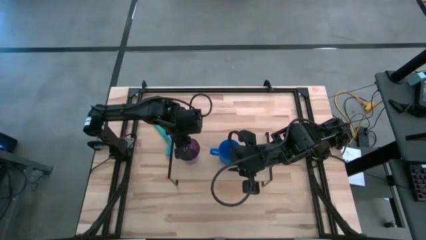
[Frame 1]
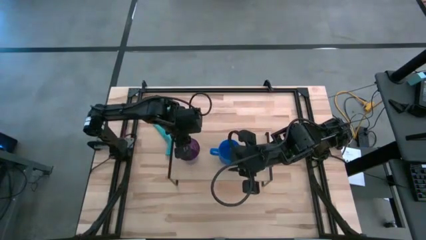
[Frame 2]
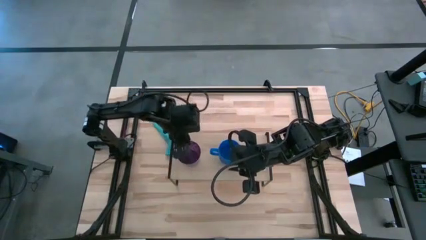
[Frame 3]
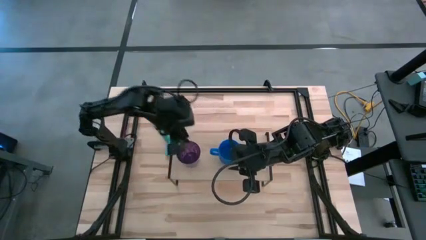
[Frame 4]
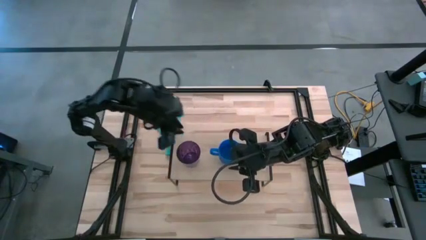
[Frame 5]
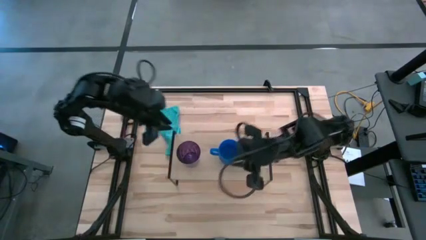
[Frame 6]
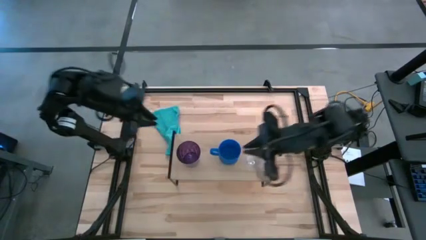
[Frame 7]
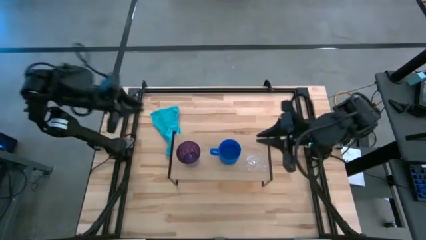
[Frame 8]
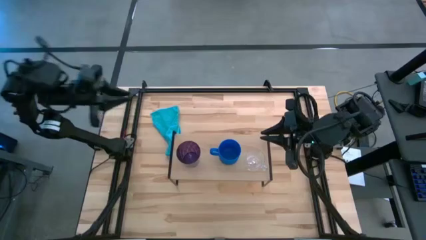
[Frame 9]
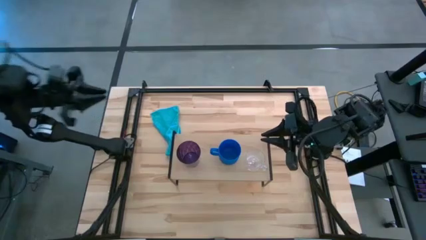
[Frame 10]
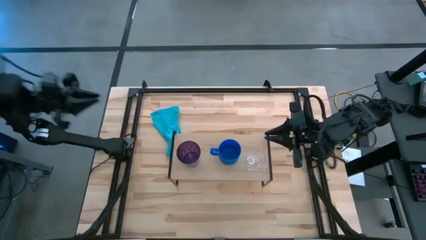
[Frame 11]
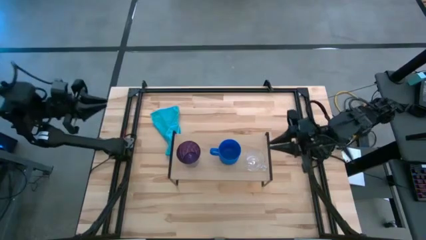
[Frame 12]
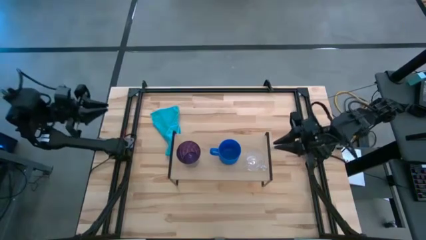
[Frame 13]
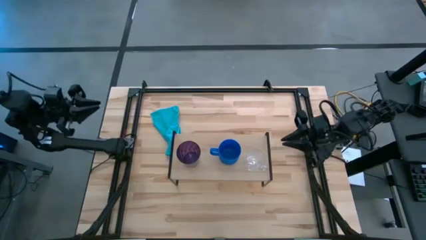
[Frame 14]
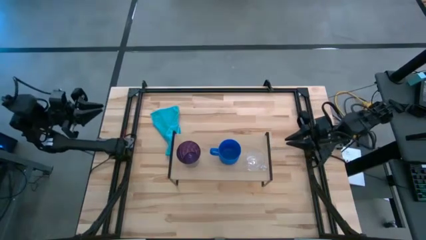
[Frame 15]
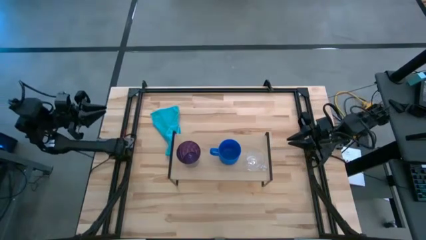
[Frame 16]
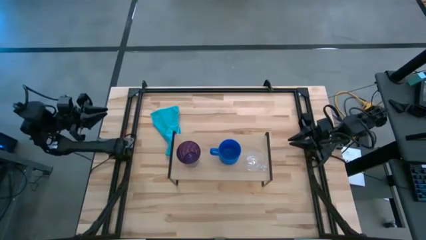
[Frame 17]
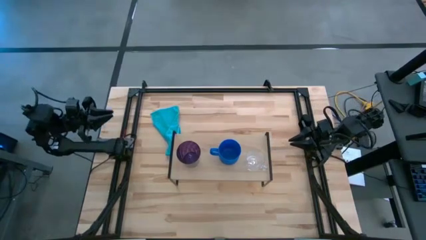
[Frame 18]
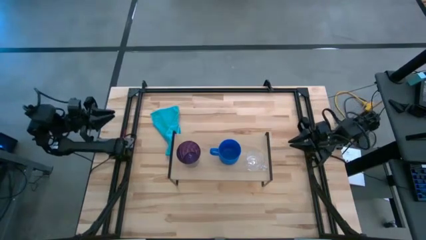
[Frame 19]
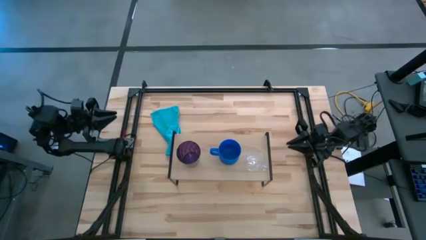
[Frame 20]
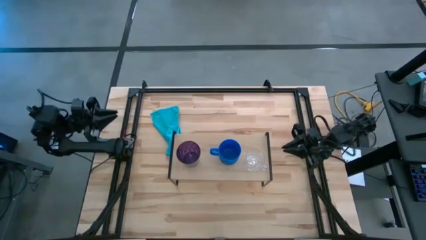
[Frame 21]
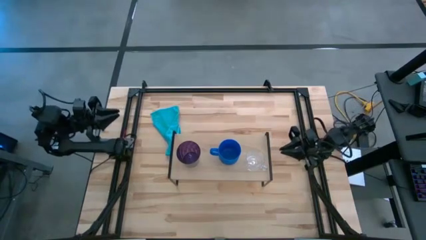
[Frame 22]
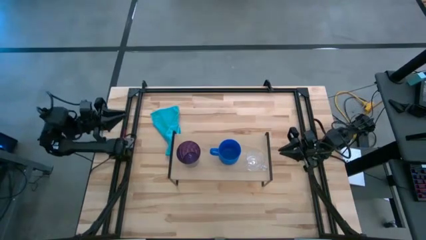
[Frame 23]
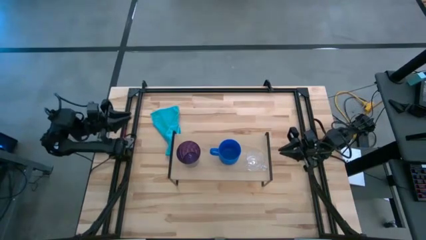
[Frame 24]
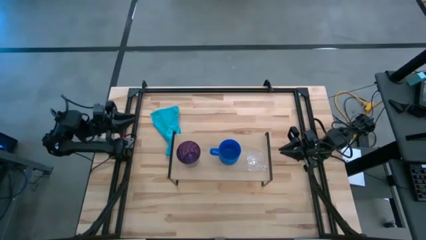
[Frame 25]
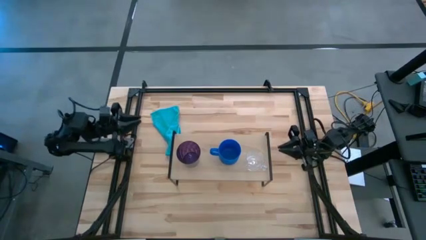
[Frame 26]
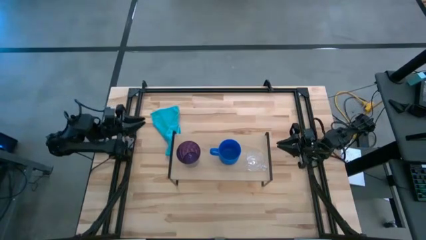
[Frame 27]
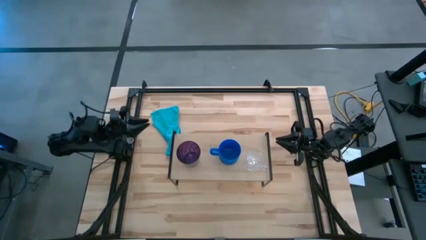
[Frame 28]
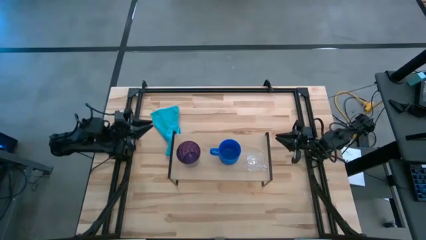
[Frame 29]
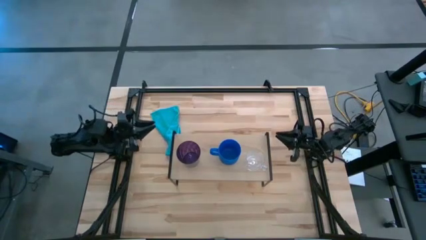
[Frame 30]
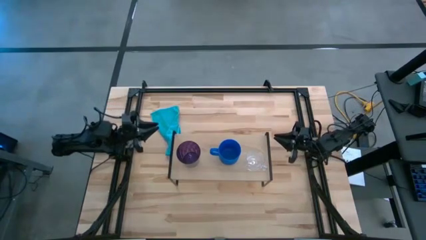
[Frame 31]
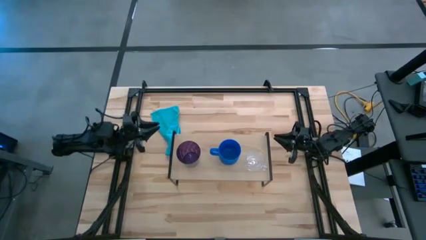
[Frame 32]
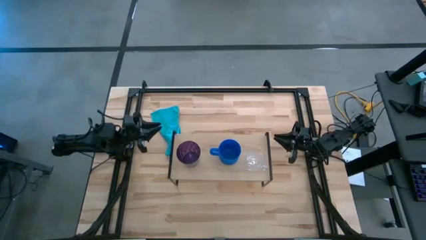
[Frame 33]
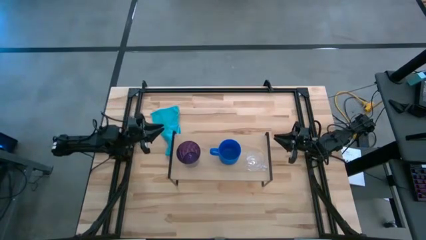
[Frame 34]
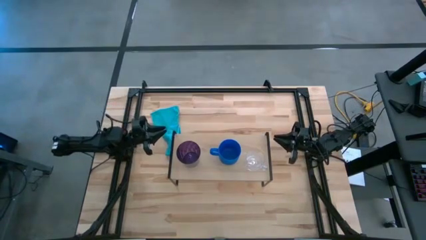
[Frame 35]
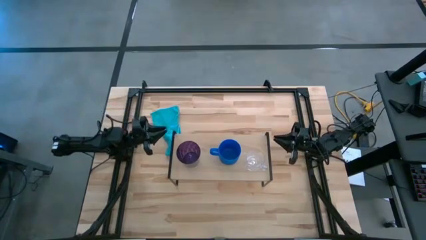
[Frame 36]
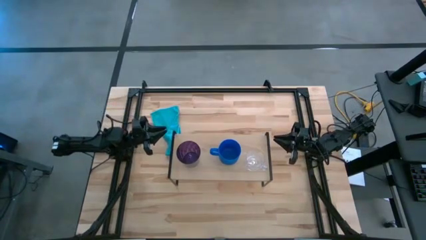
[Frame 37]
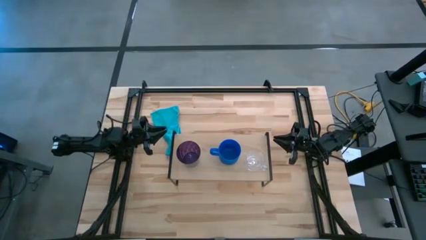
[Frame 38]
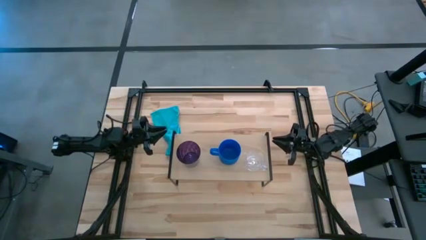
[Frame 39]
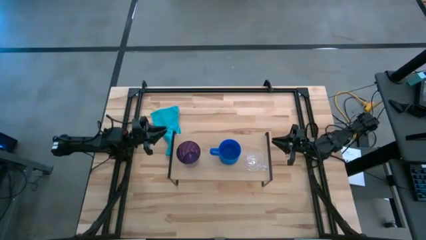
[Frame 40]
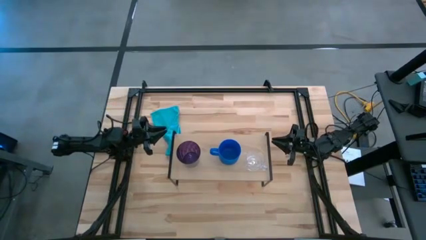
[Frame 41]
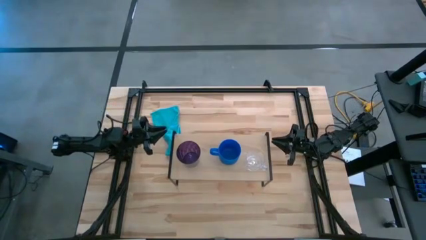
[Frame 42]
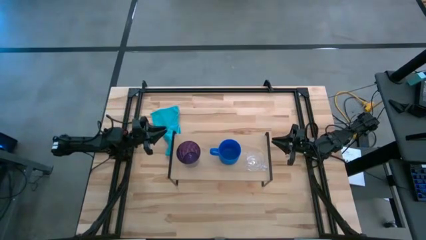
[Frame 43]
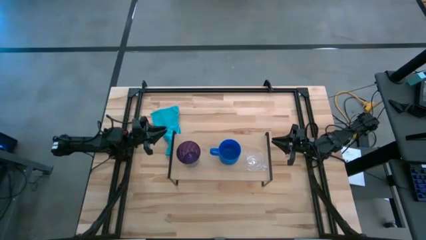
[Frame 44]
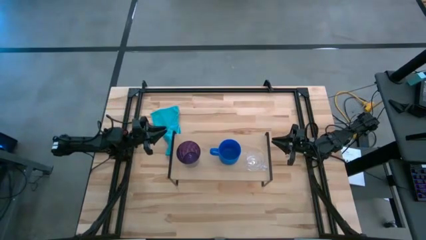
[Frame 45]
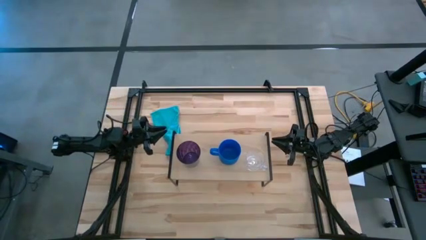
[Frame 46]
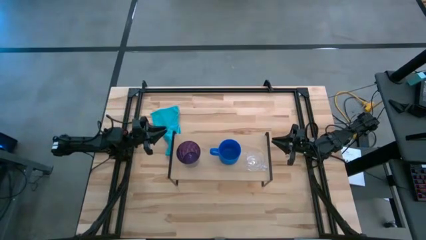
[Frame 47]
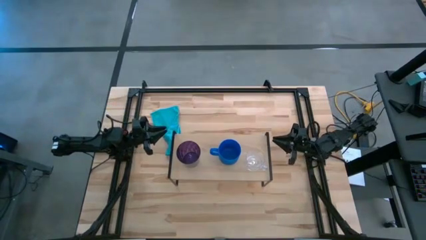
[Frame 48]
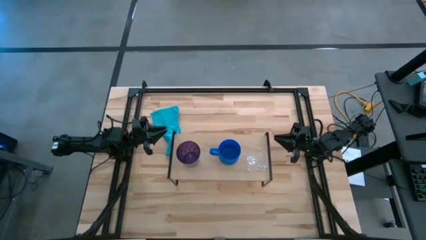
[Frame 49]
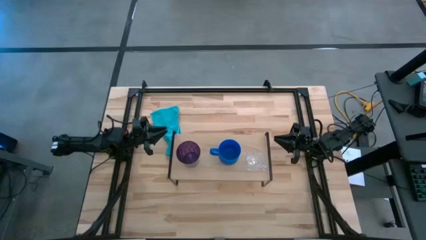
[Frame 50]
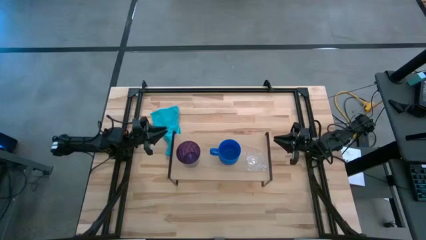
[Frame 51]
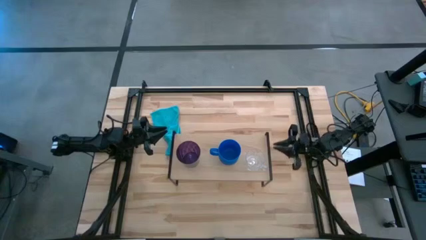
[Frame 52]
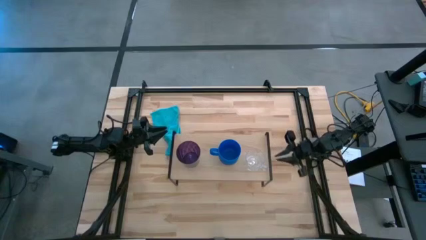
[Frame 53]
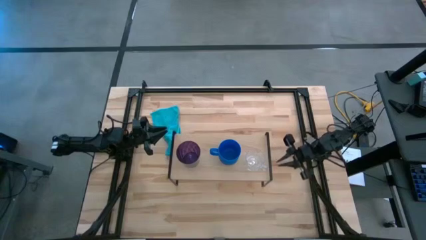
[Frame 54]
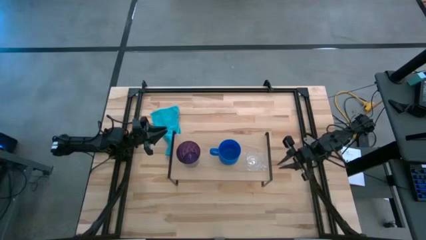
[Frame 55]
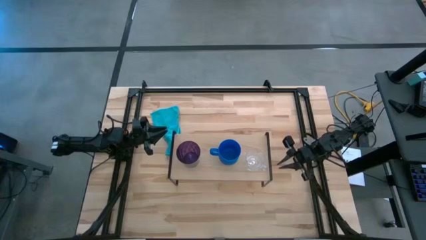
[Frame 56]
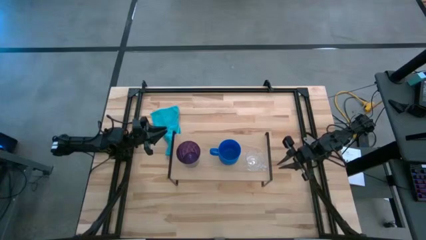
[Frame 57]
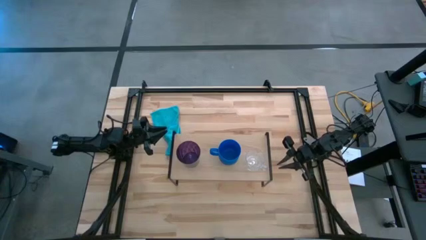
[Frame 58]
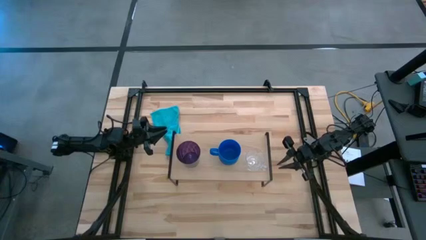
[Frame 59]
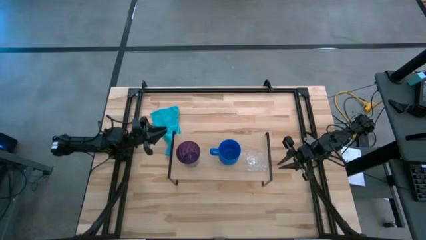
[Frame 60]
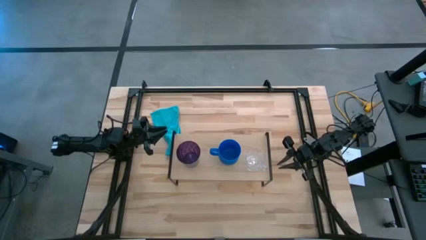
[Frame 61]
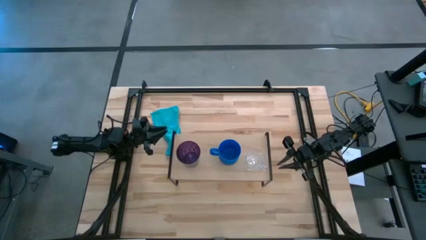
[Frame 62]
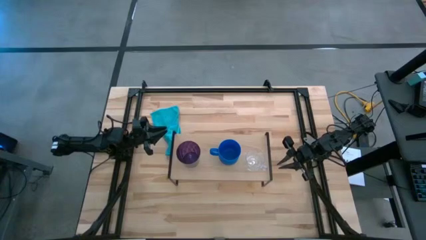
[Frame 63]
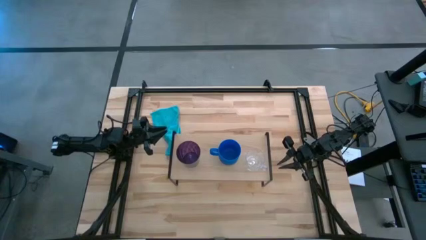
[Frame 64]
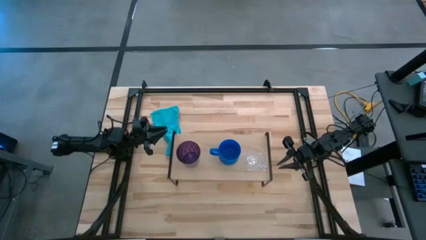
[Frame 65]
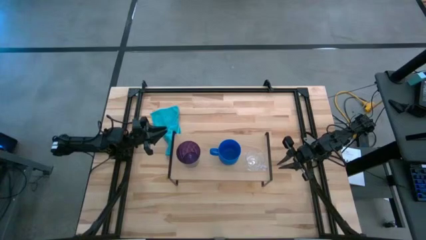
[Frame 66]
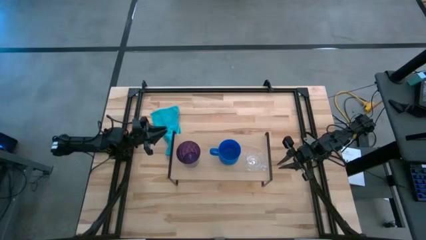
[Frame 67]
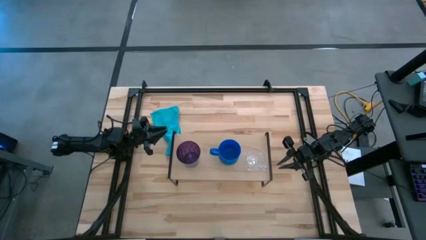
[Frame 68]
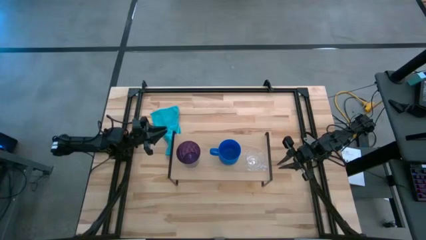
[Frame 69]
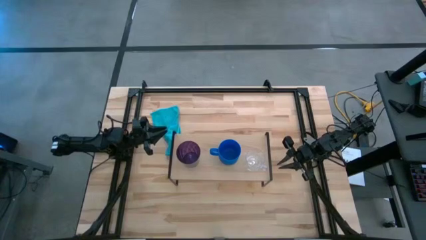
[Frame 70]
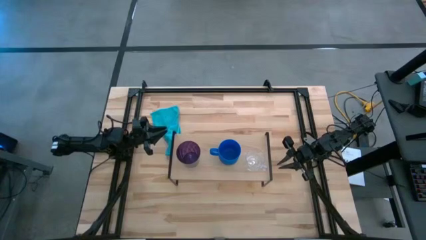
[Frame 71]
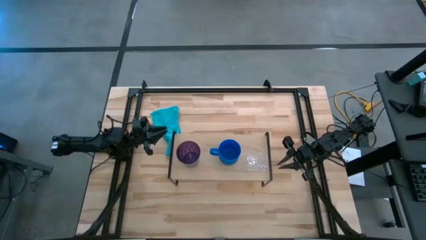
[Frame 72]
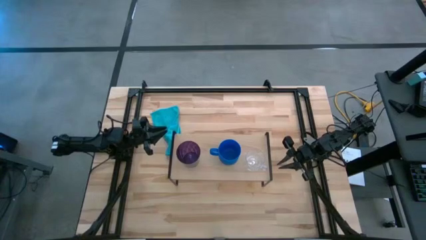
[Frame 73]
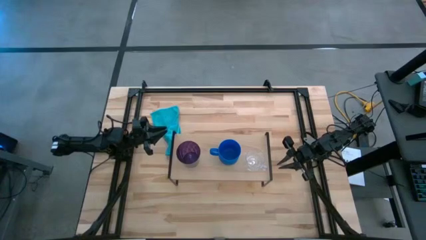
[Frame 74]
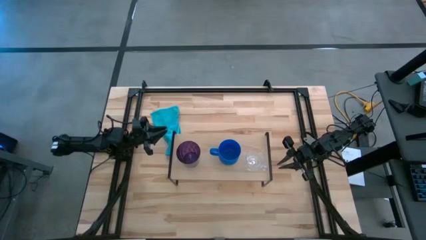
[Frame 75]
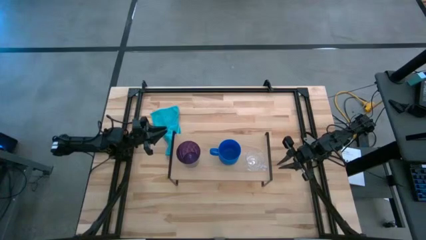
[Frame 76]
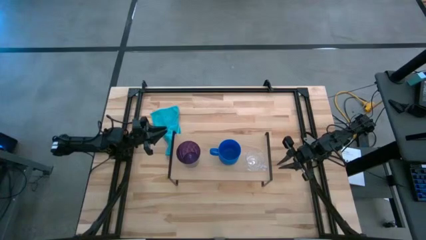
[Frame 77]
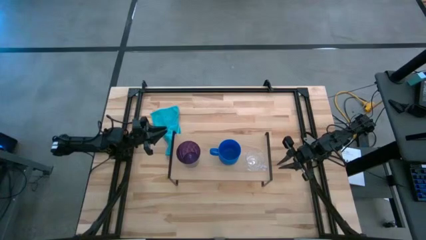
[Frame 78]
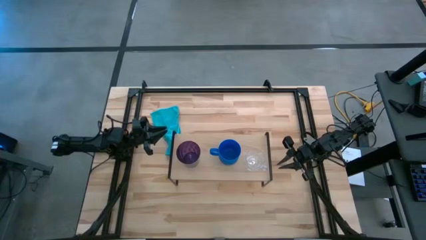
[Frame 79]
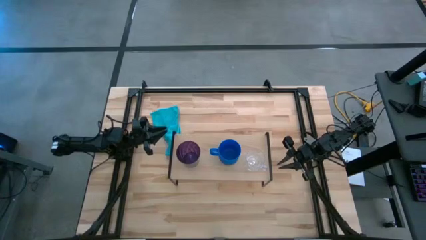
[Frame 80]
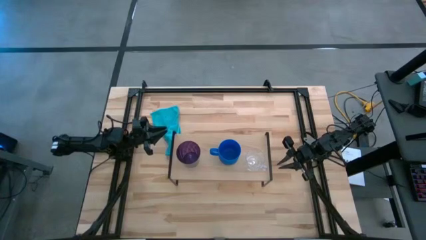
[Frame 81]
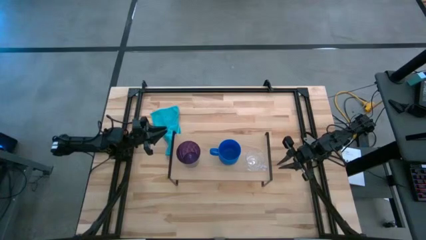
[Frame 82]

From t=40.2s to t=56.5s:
Task: Stack small to large cups/mugs on shelf
Return to home position
